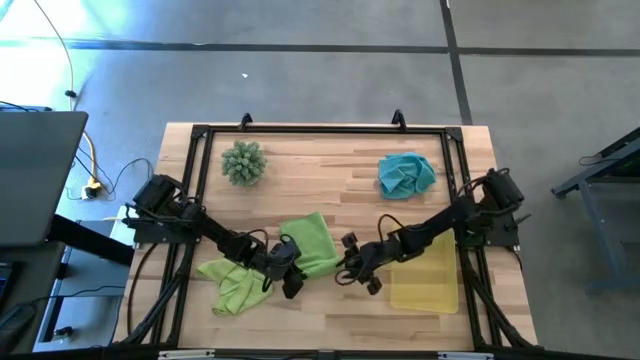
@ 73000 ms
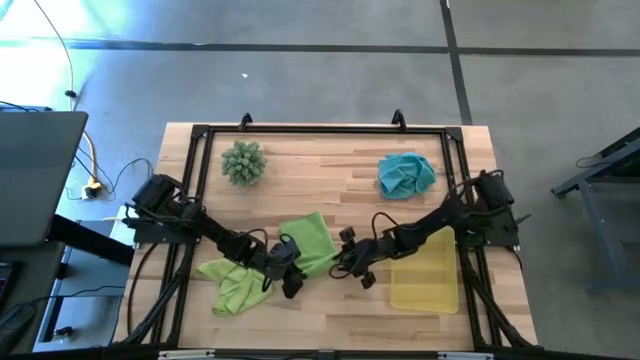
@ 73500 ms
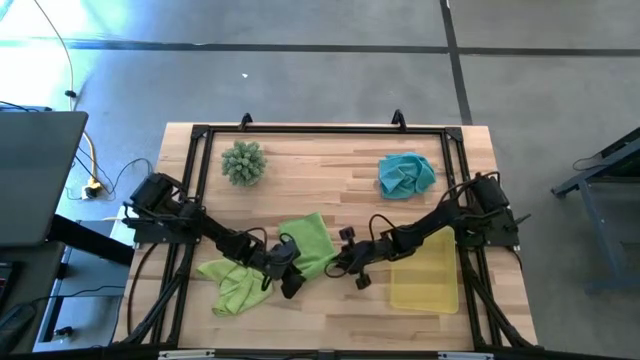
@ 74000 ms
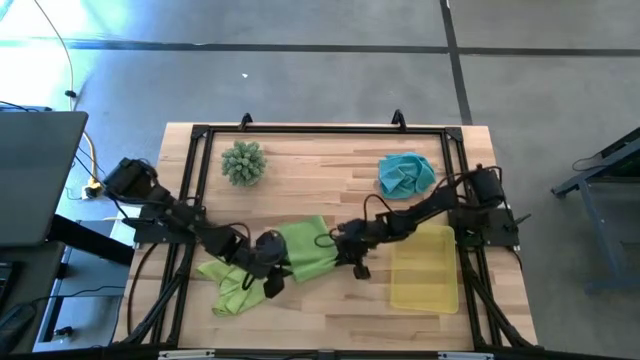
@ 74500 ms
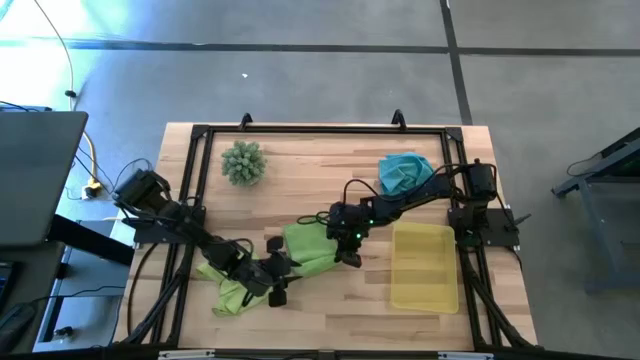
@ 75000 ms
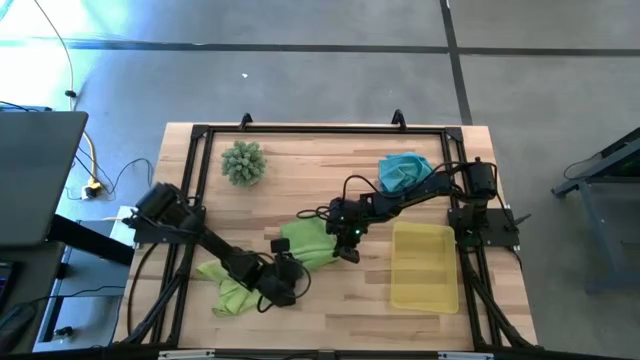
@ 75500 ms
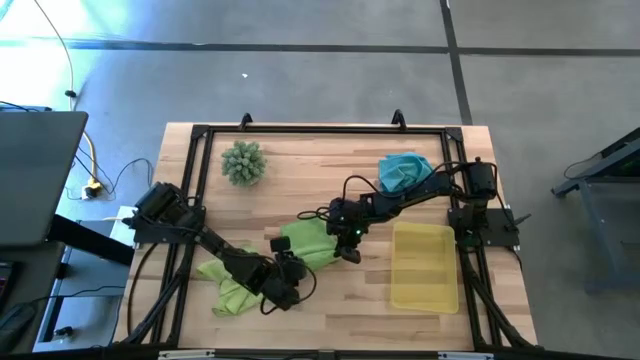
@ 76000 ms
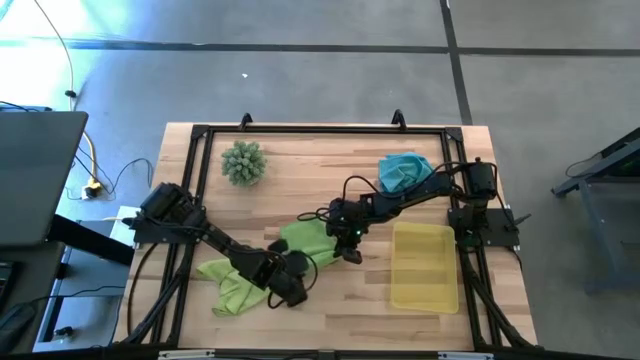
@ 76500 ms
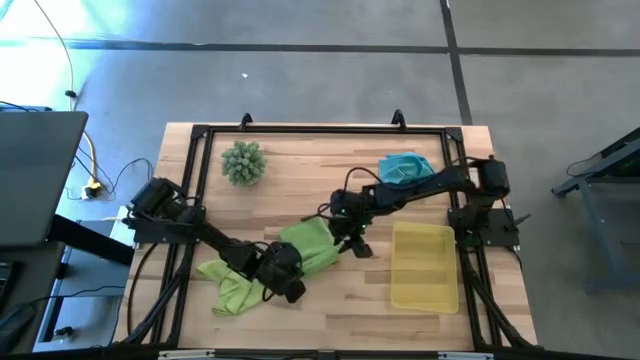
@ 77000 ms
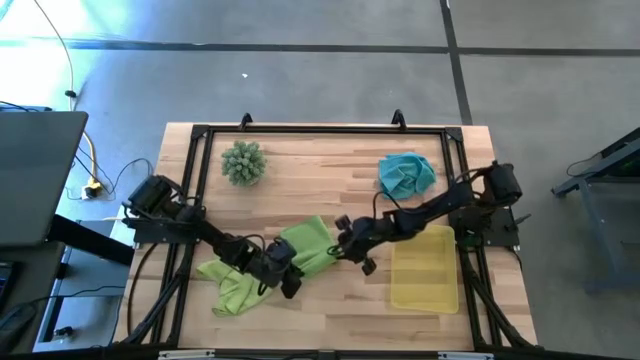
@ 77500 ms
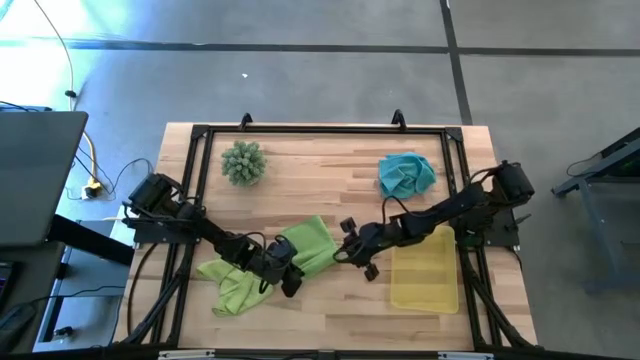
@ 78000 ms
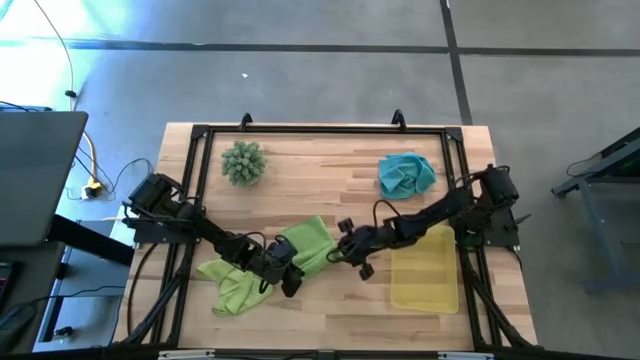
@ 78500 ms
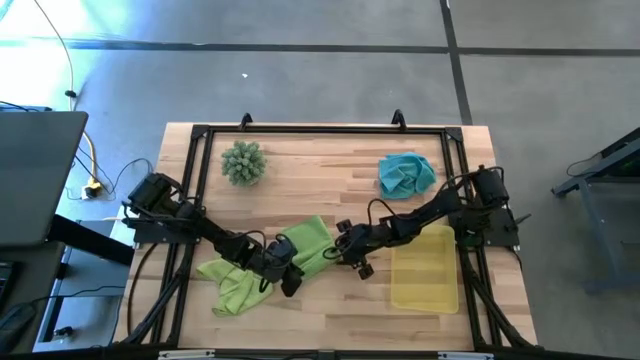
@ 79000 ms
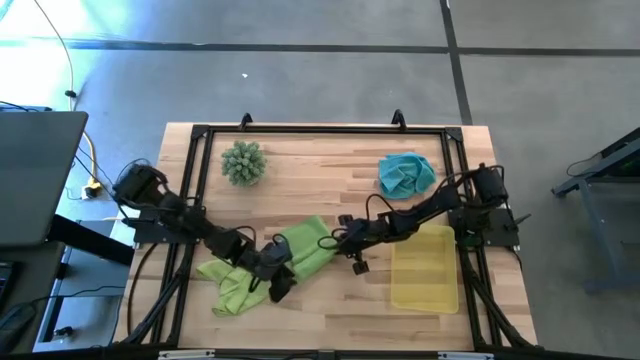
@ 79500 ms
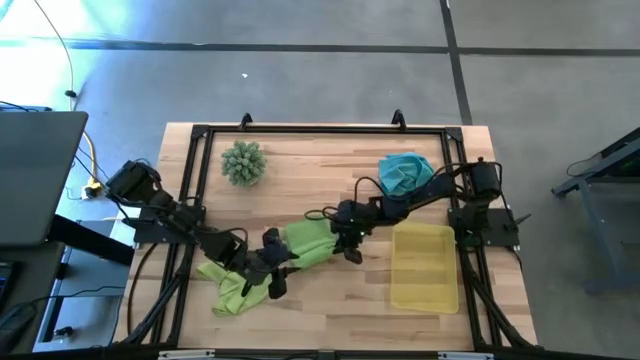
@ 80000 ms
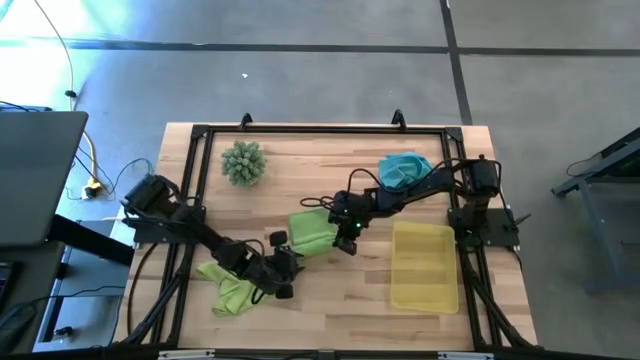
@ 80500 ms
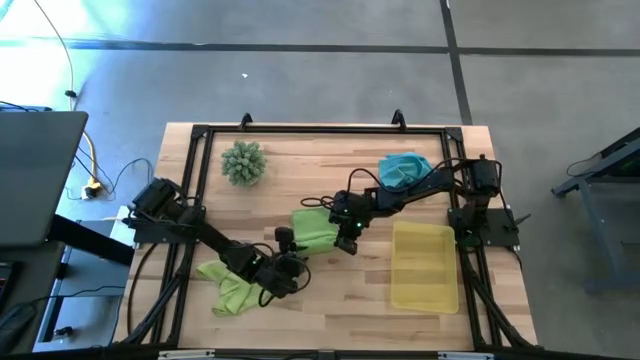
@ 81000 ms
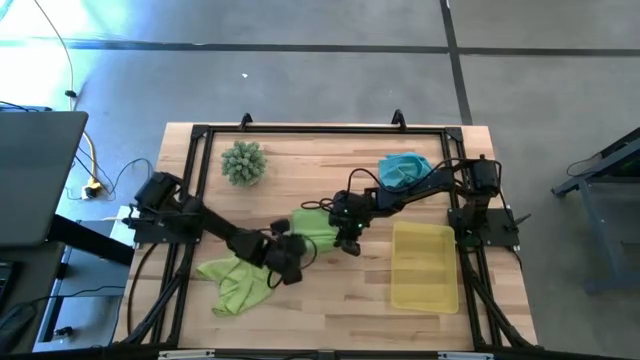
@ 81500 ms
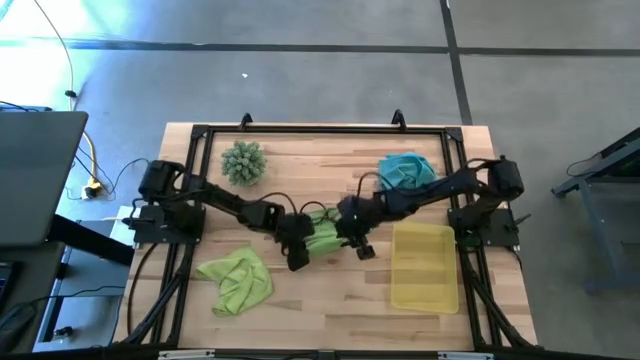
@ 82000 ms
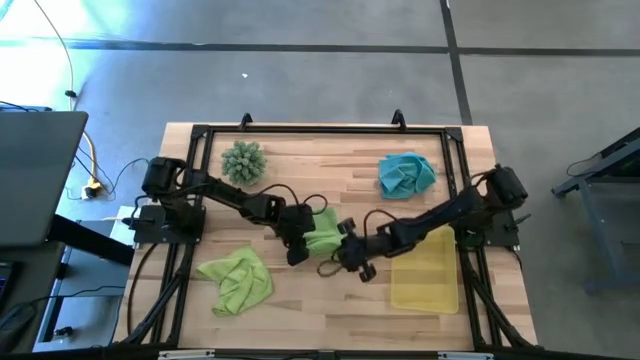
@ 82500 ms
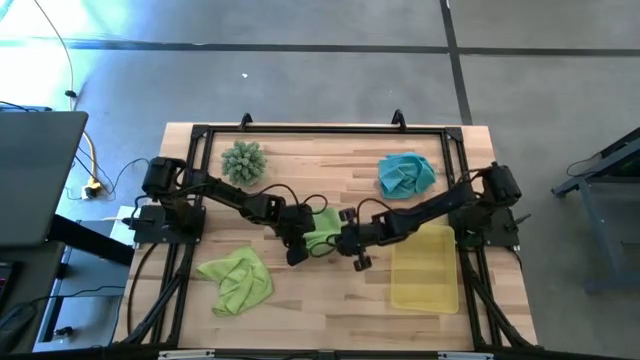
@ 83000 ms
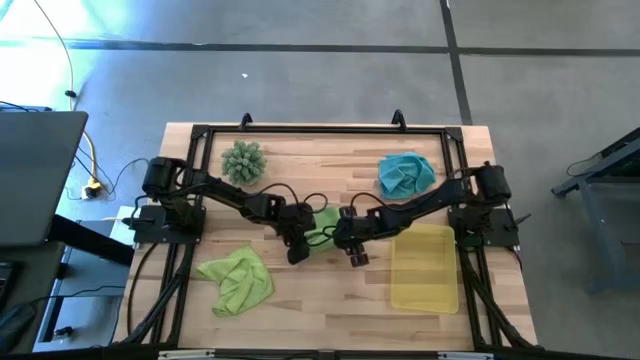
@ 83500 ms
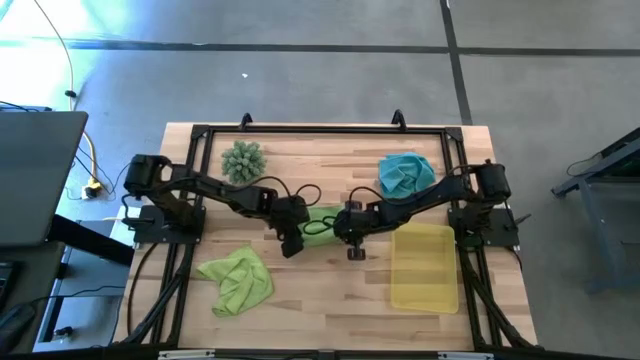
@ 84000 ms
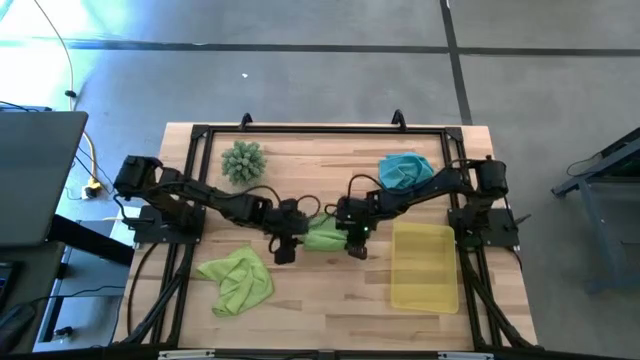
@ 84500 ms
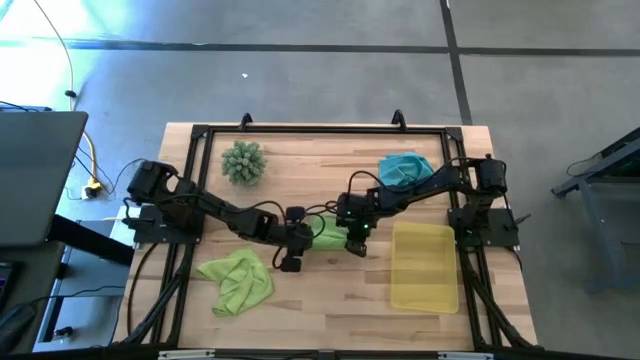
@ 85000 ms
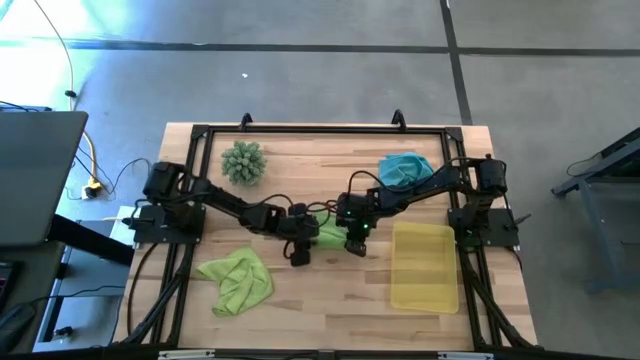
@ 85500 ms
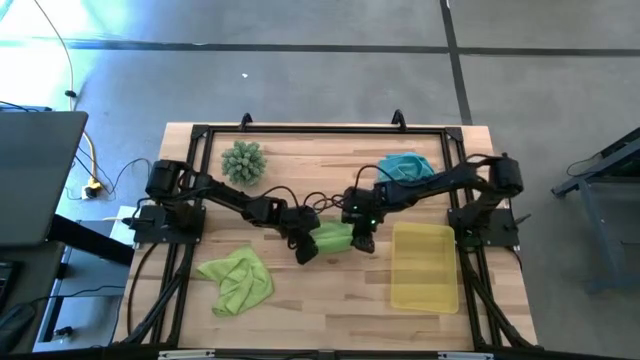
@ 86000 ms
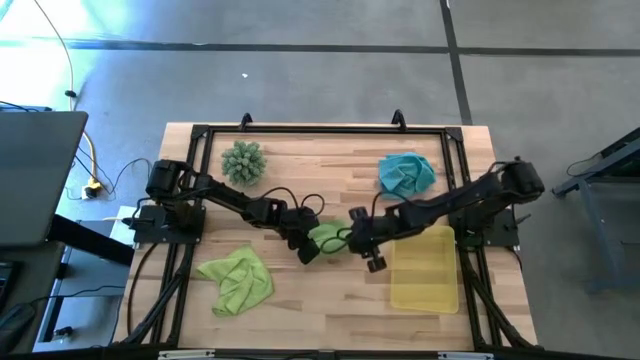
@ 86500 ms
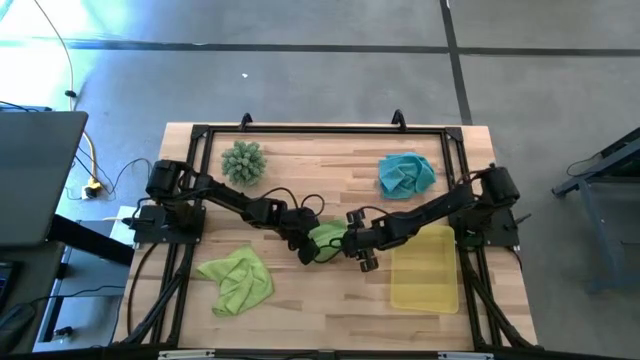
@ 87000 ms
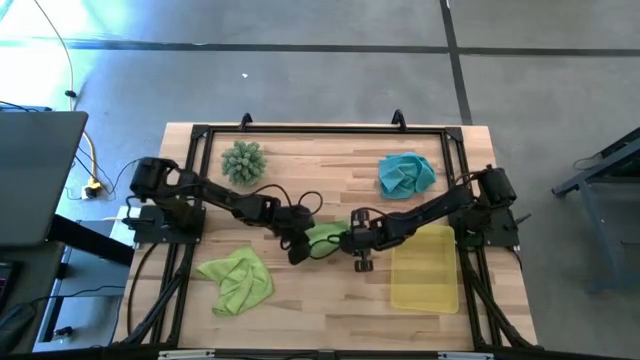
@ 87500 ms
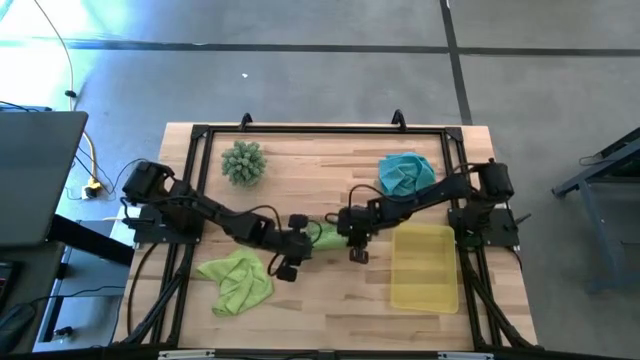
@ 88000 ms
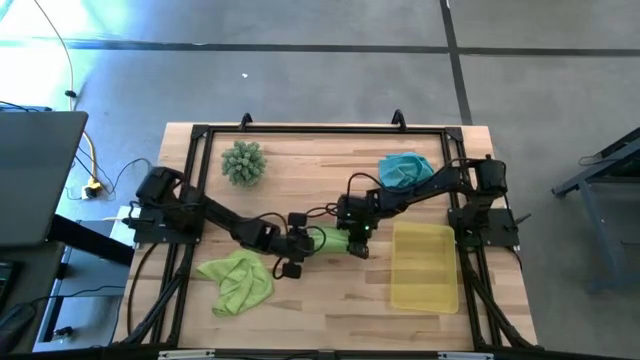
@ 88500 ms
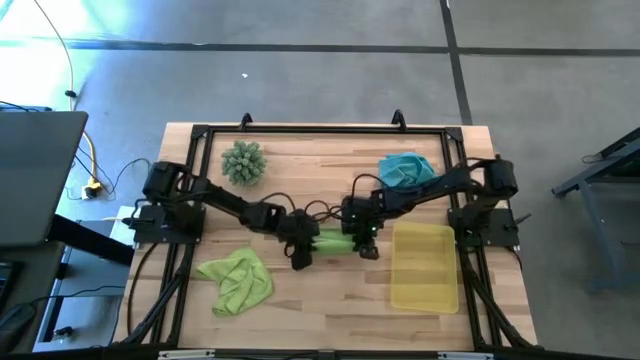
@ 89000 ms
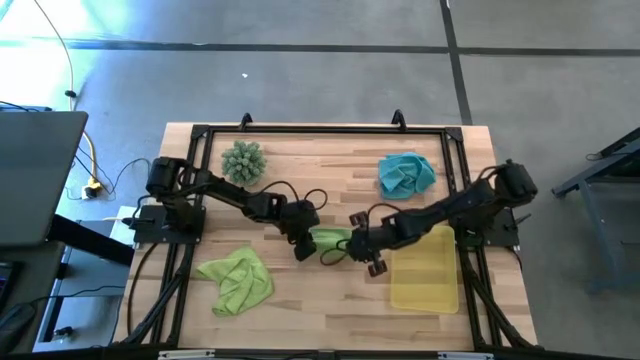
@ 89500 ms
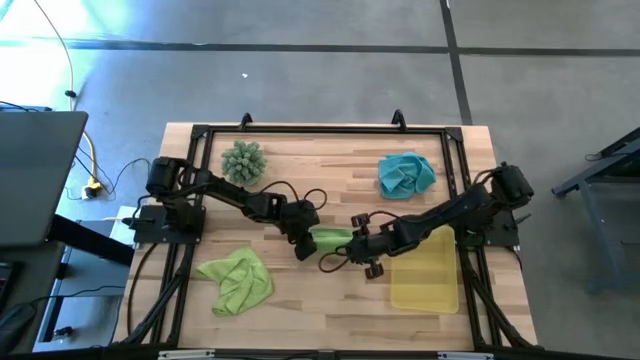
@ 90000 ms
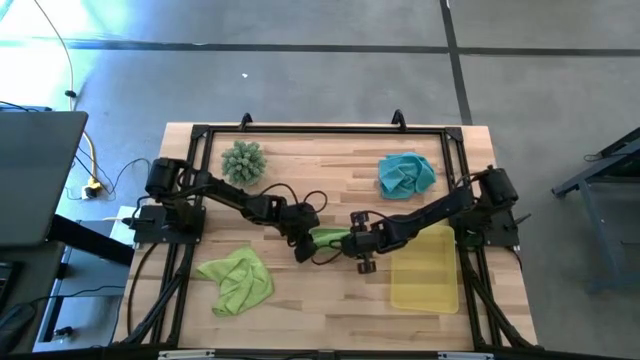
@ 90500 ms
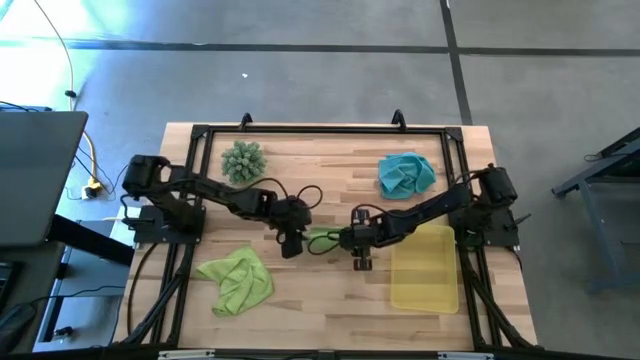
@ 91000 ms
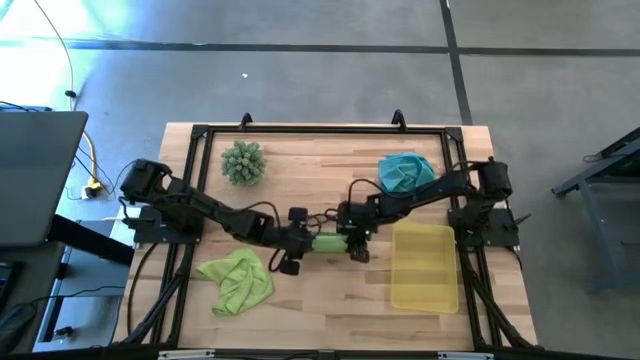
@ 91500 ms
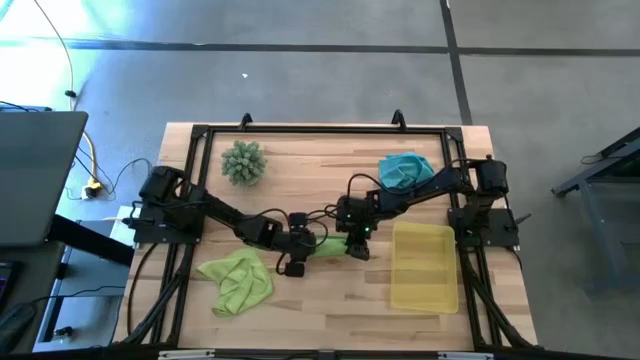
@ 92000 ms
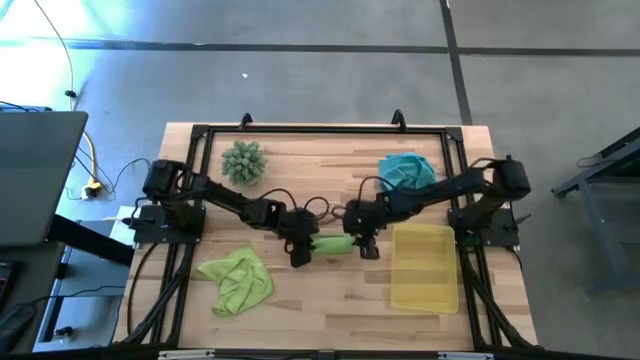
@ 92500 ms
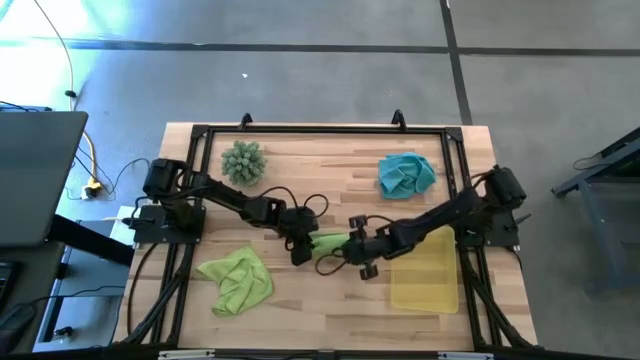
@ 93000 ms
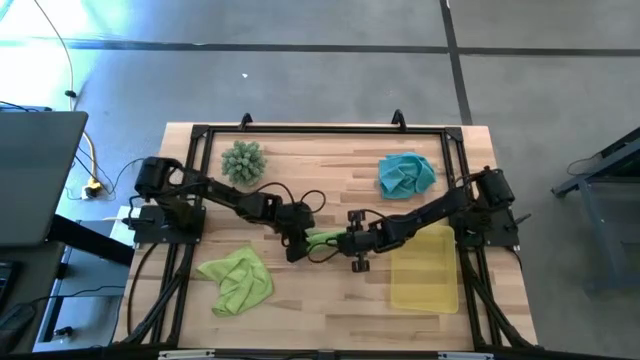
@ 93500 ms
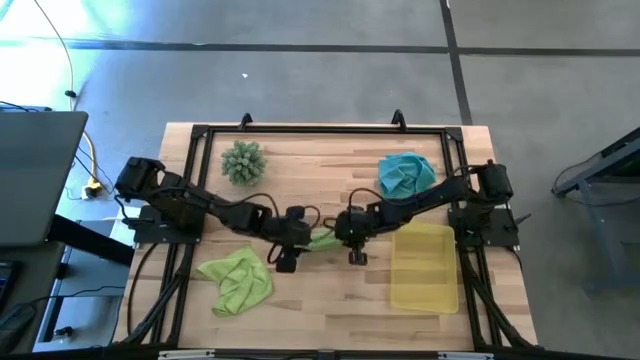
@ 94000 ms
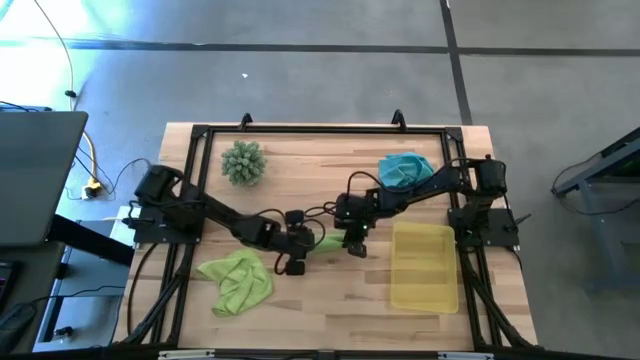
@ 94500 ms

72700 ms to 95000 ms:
Task: Roll microfiber towels into tight, uniform cylinder then place into a basket
Roll the green cloth
